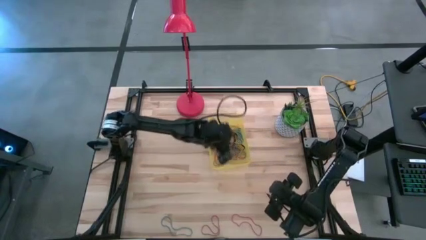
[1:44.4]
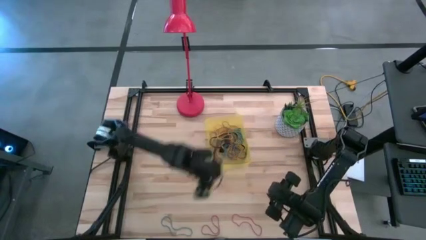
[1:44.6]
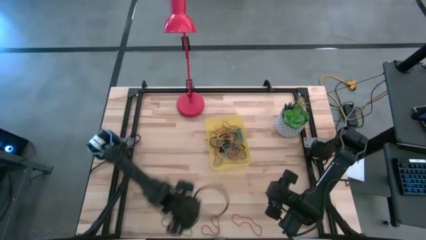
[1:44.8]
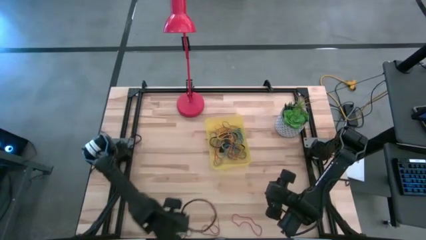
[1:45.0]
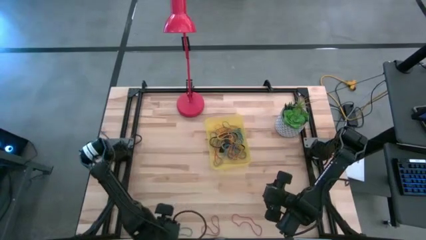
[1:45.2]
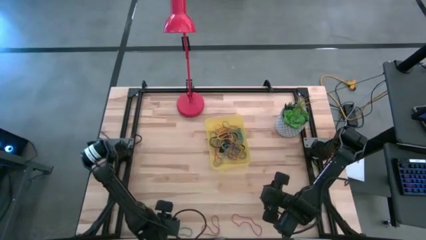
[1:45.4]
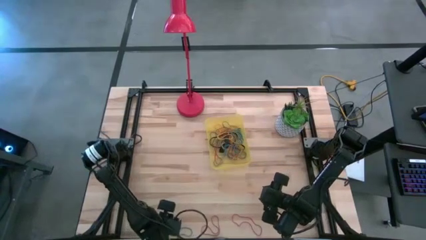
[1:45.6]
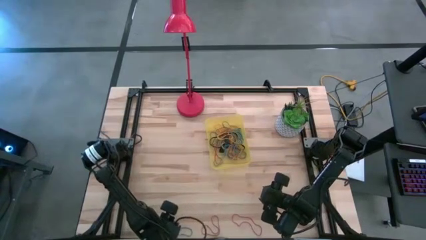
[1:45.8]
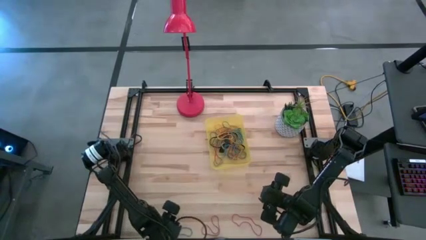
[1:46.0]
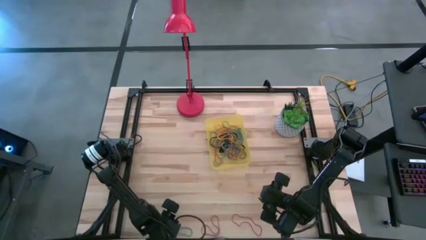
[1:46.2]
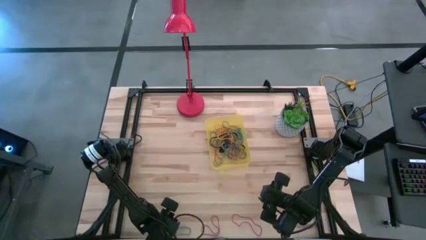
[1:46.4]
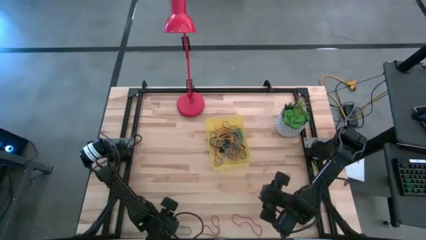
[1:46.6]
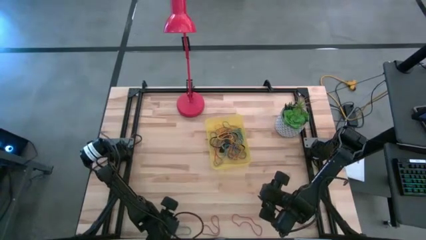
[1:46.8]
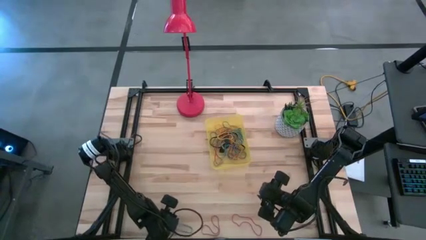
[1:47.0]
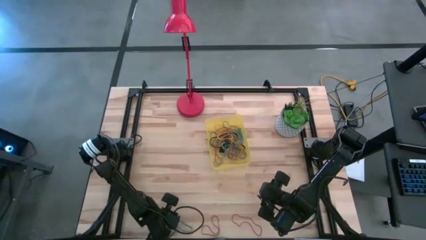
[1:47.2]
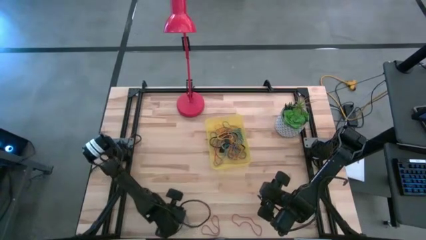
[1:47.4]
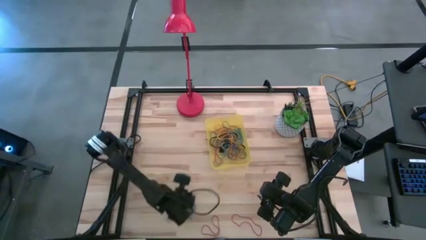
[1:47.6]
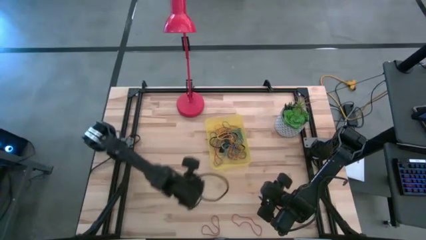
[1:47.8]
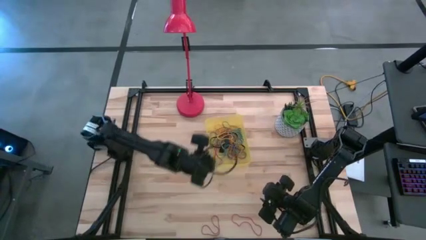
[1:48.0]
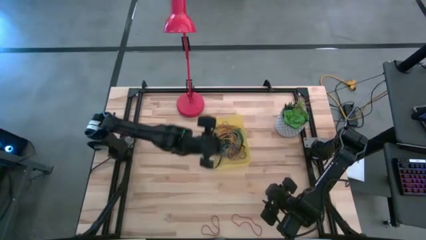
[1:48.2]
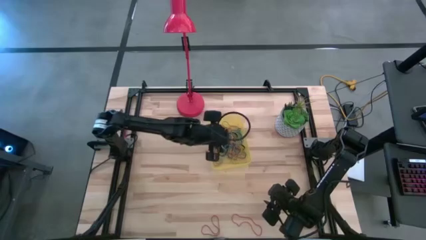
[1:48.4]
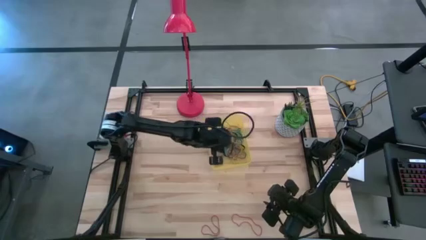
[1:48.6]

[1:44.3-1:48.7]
Task: Pick and place rubber bands into bin
Put the blue rubber band into the yellow bin

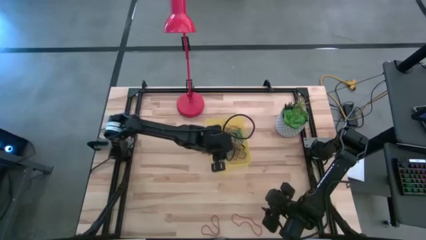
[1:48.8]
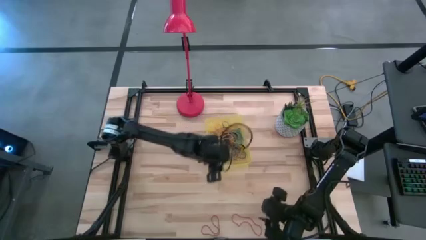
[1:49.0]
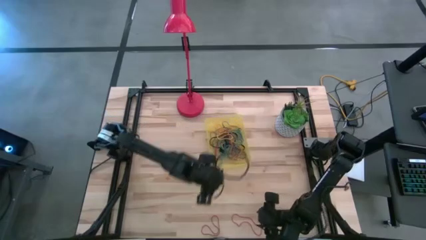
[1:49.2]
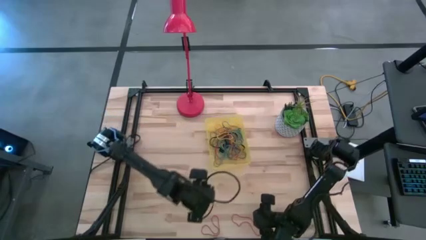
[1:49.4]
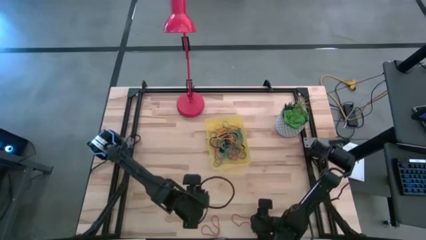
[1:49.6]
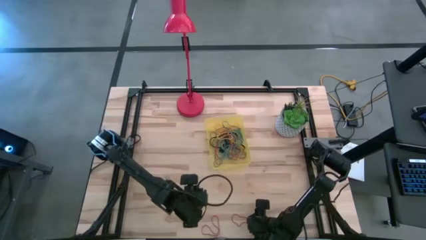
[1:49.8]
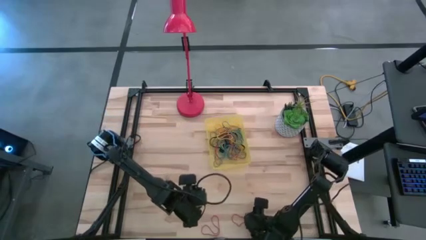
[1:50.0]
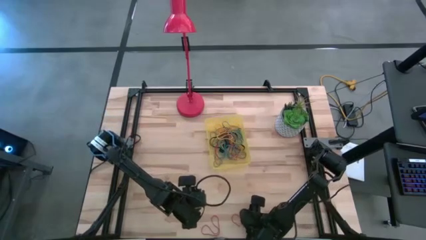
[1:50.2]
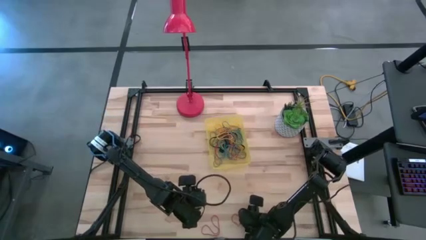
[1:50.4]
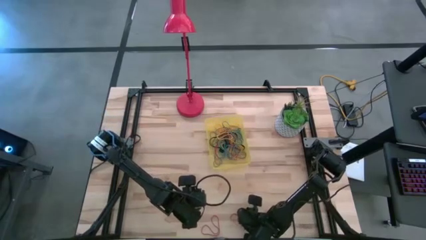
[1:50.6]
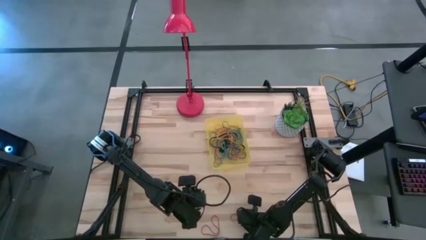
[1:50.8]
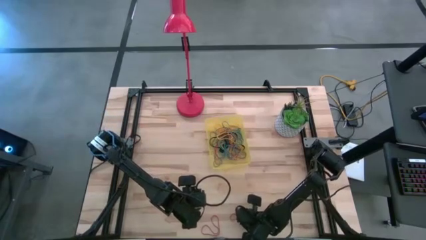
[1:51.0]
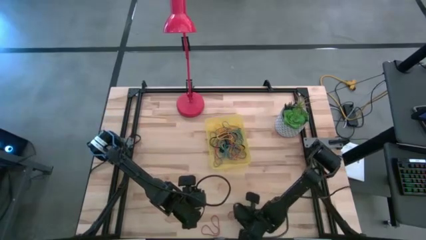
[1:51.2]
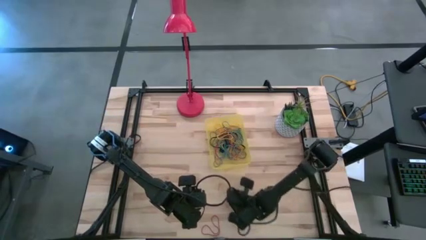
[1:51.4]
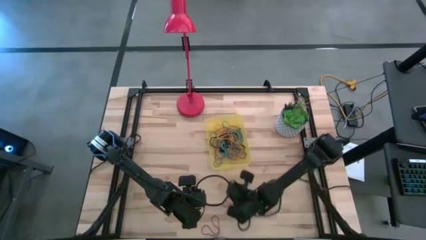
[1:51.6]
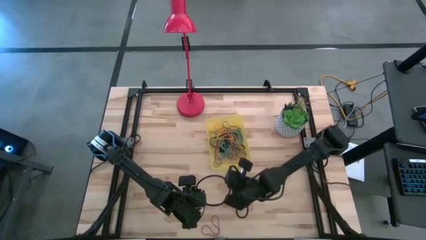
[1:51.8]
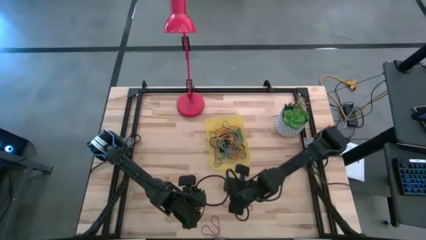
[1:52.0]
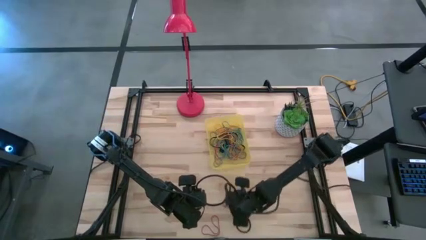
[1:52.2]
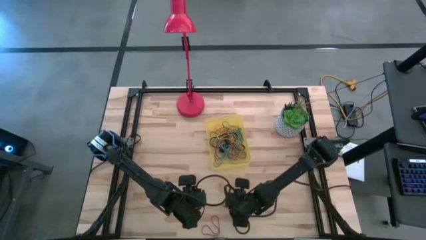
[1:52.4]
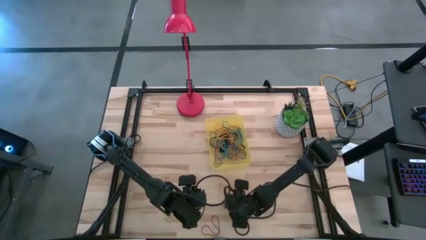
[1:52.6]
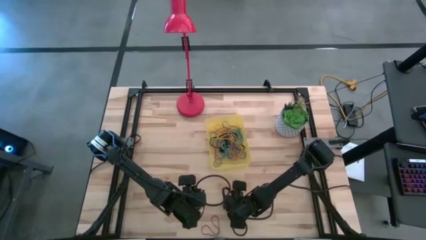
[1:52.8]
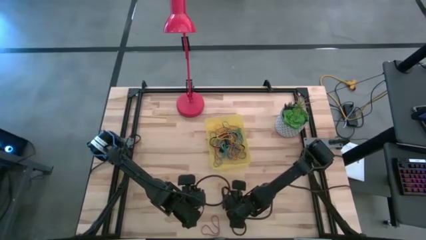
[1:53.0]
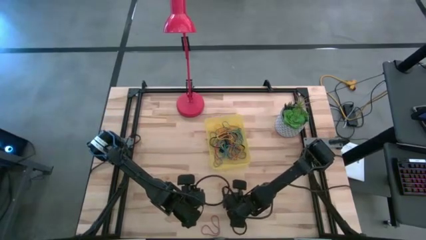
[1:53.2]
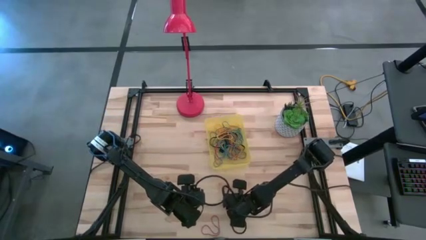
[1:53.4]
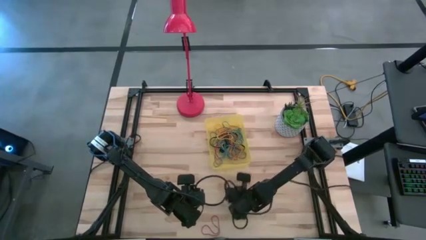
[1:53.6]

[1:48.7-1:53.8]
Put the red rubber band into the yellow bin

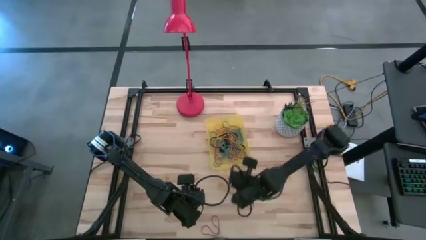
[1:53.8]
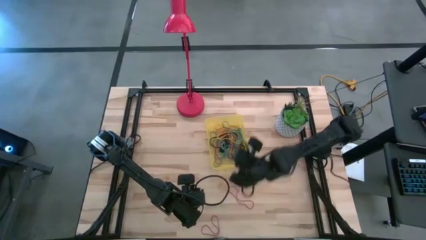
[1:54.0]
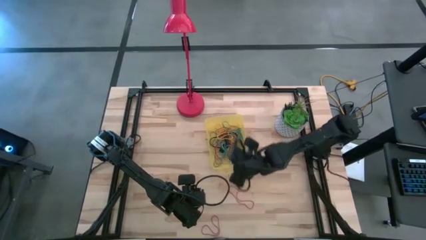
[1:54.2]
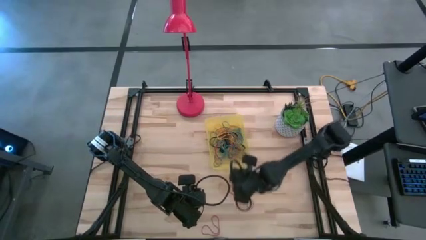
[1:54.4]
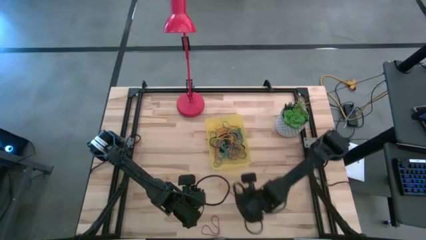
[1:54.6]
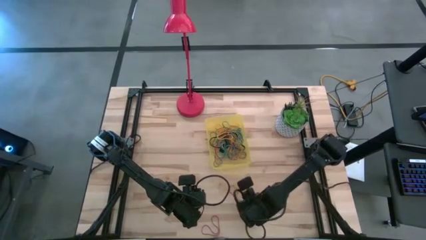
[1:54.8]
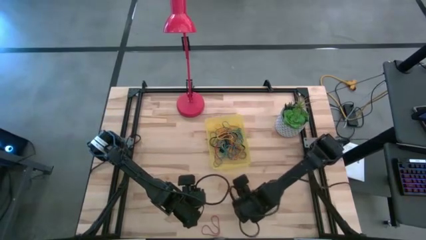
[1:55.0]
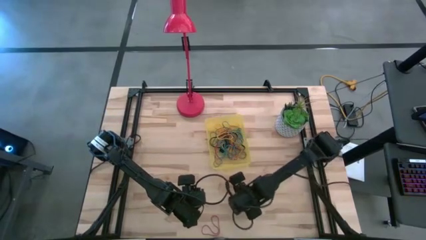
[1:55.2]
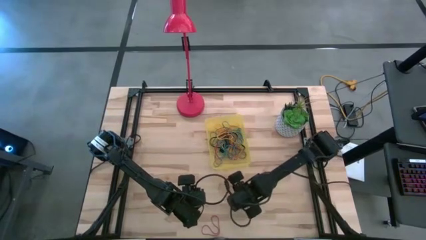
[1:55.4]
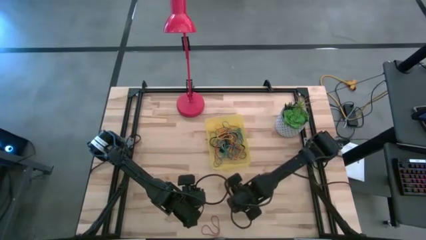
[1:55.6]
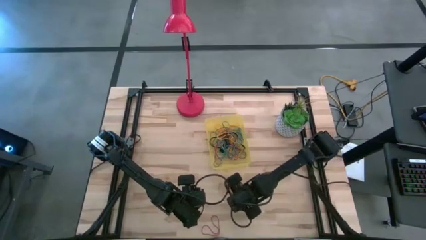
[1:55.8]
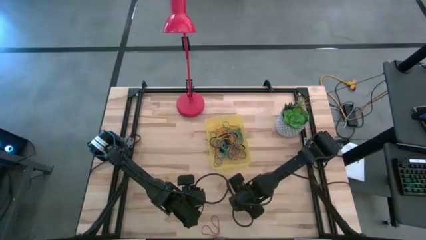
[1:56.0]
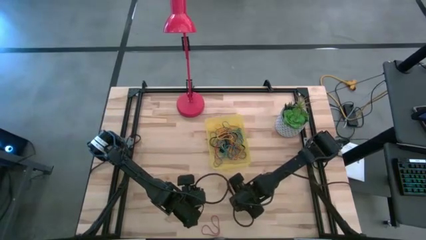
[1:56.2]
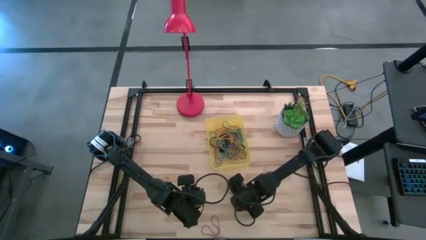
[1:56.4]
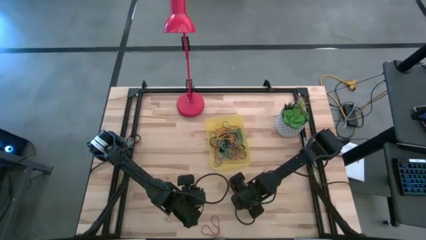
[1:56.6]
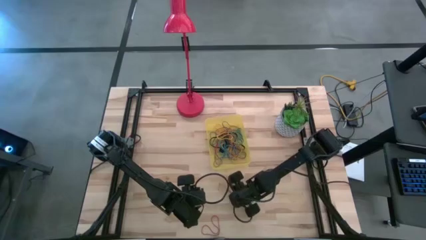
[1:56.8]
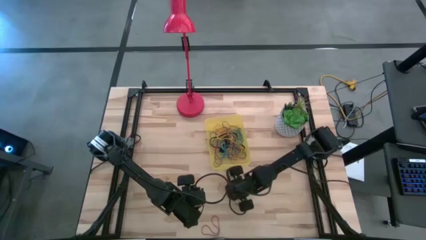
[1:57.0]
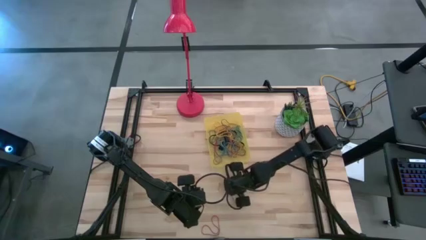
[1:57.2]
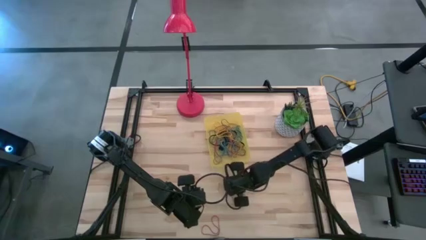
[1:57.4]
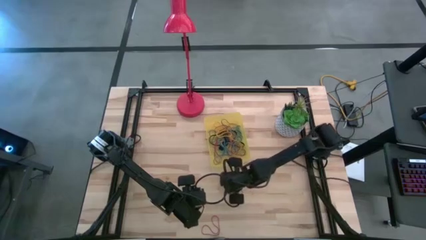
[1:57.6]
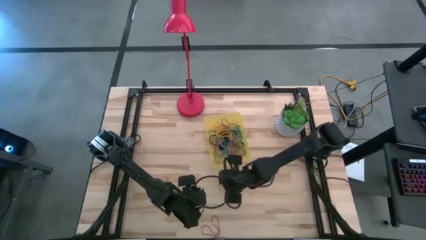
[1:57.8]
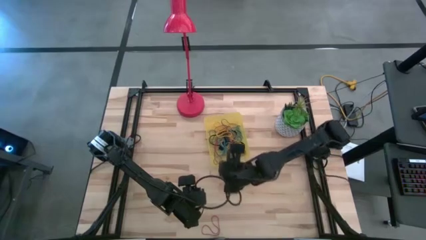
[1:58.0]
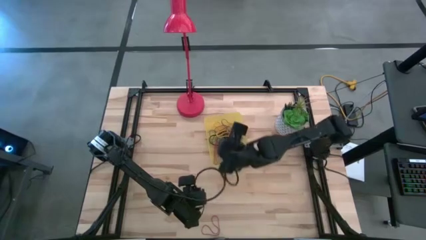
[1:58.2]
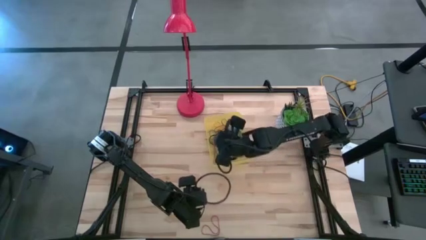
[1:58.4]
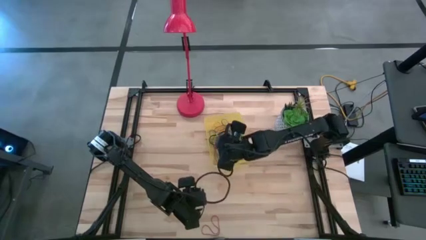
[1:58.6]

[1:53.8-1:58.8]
Put the red rubber band into the yellow bin
